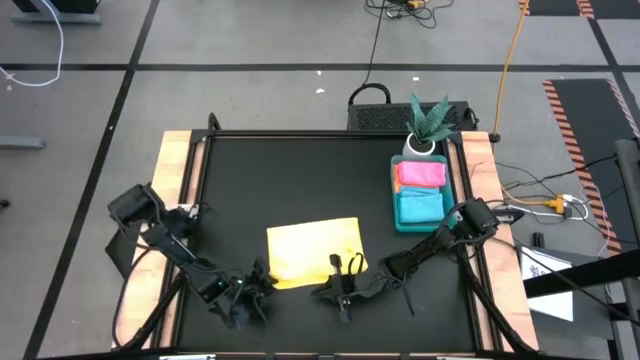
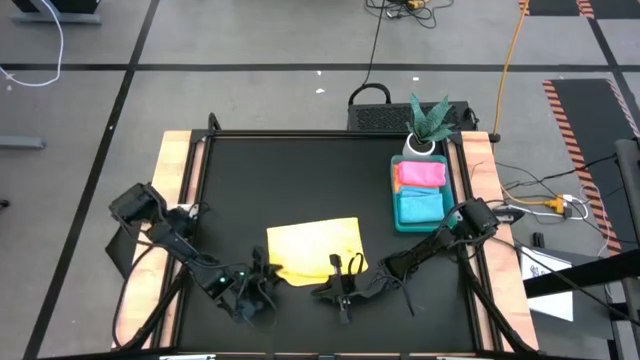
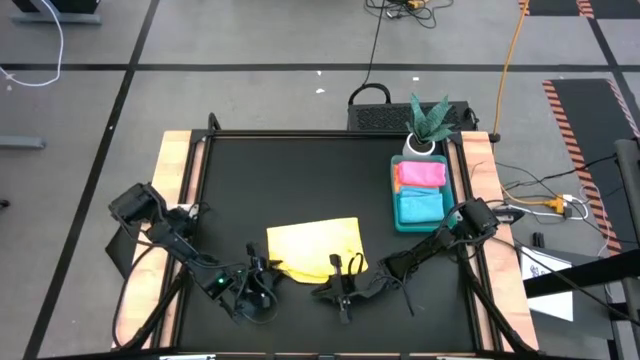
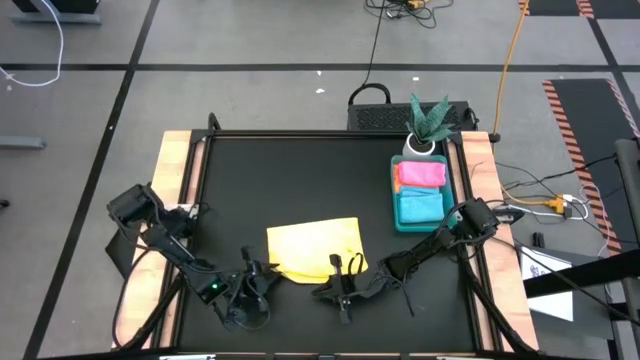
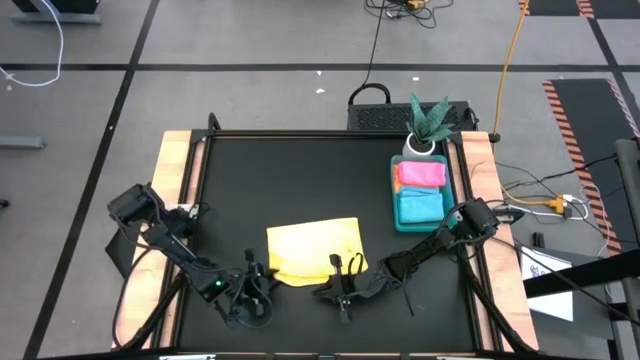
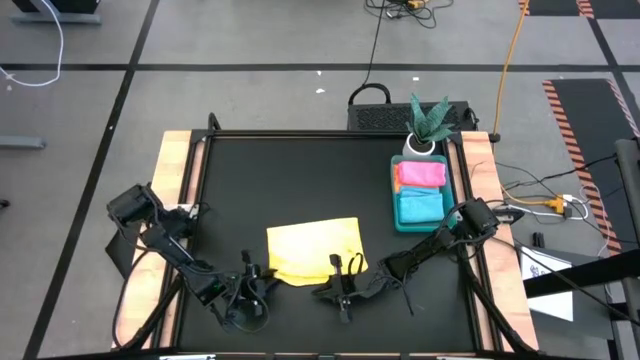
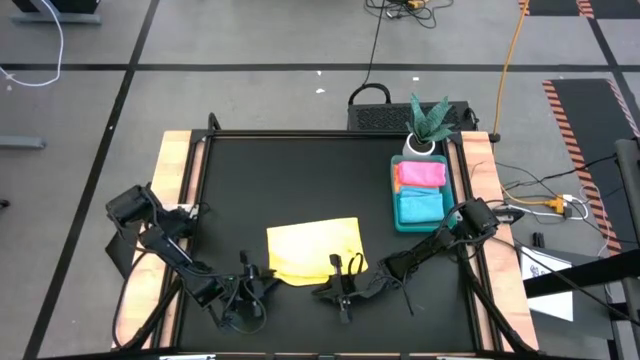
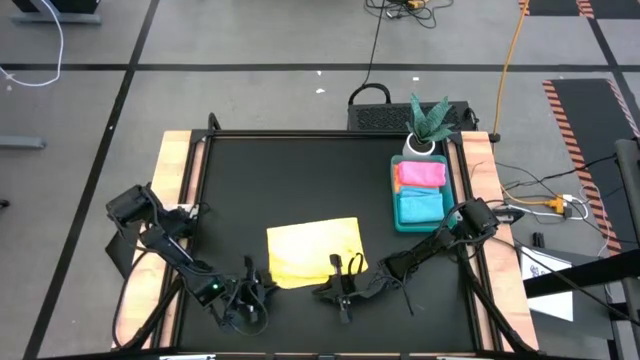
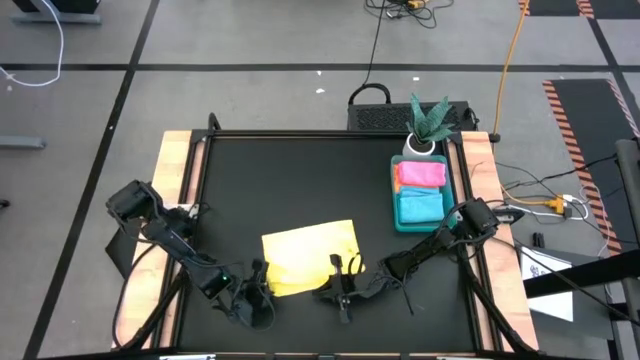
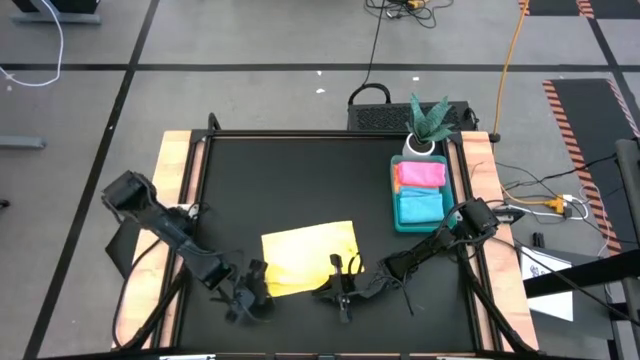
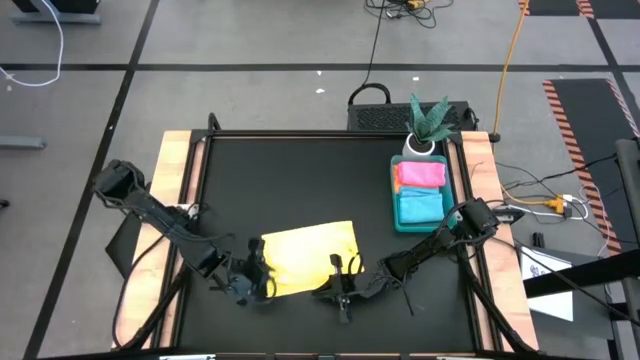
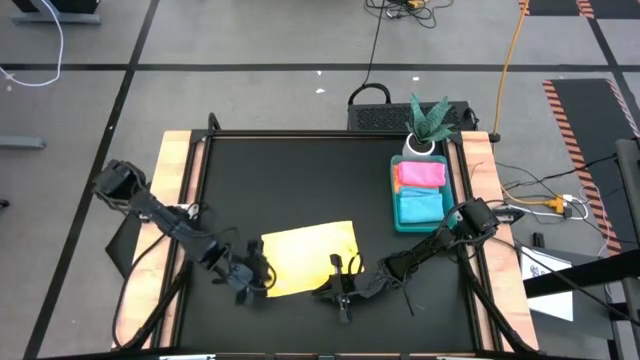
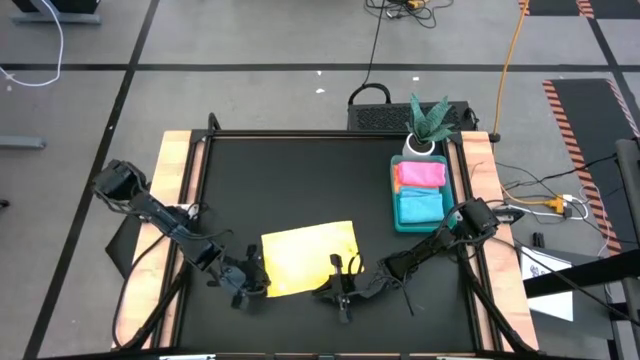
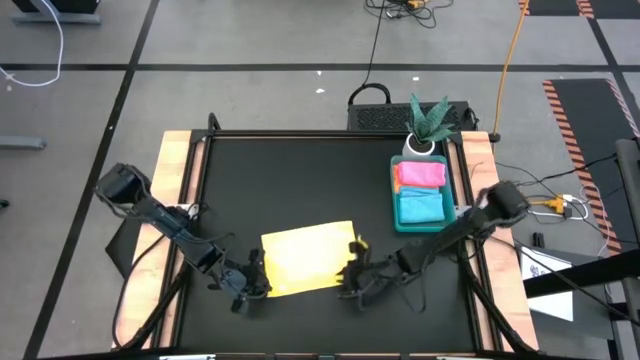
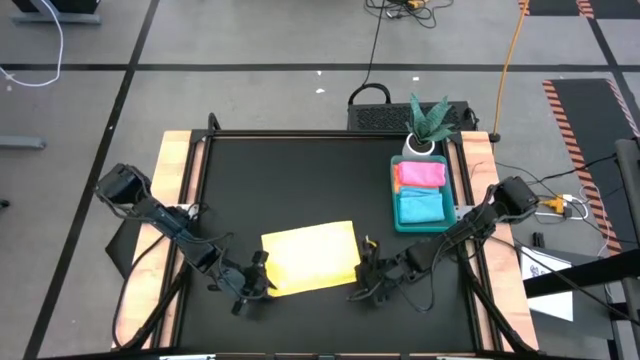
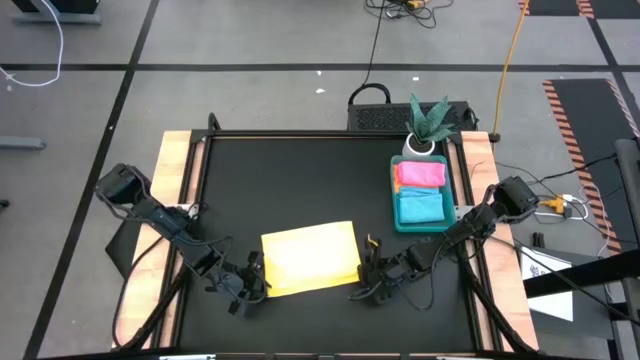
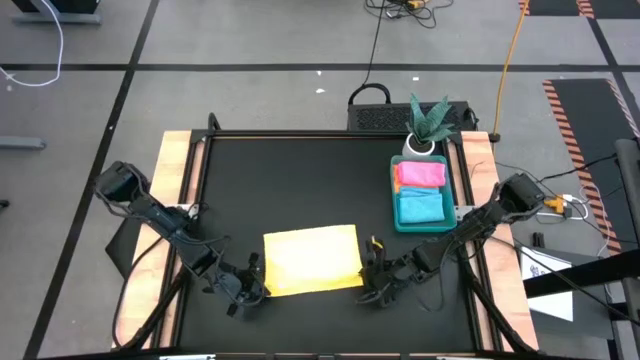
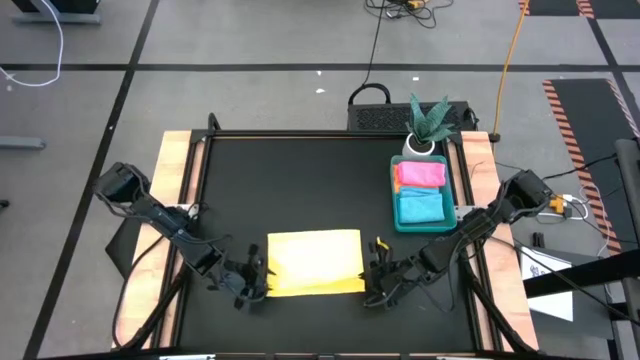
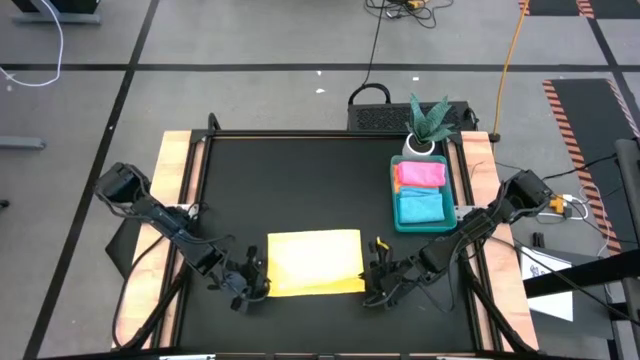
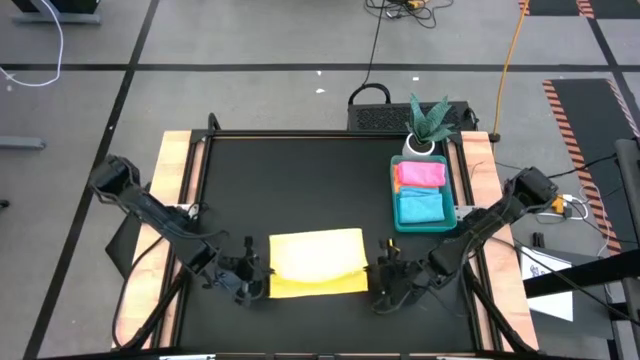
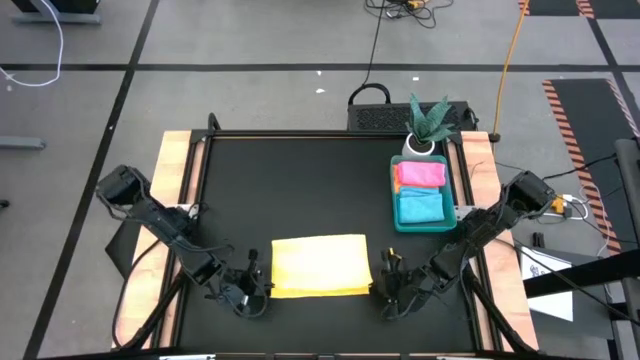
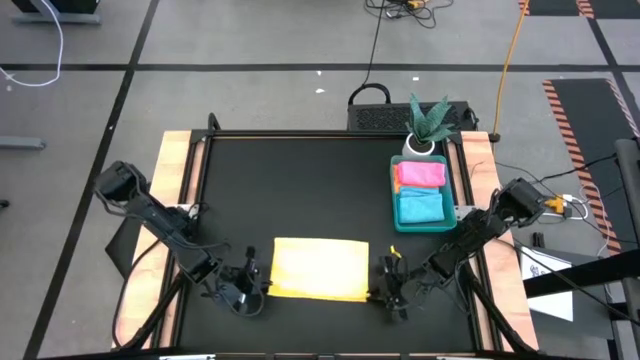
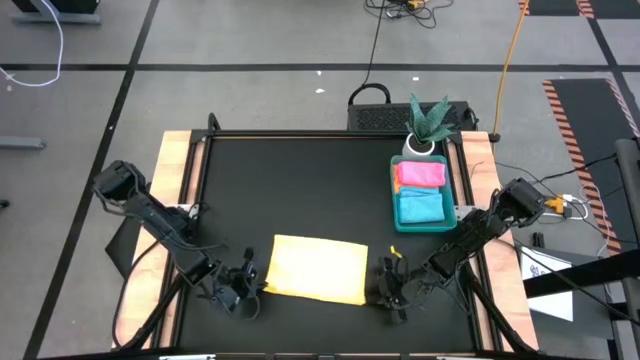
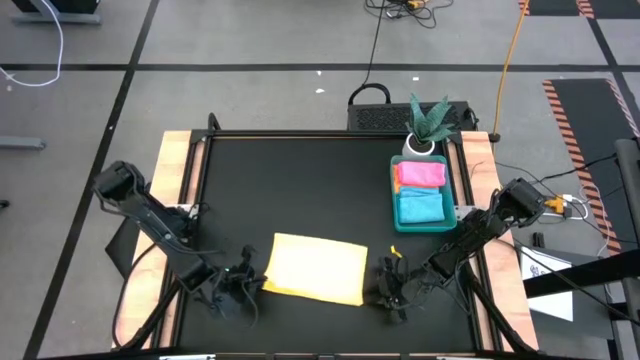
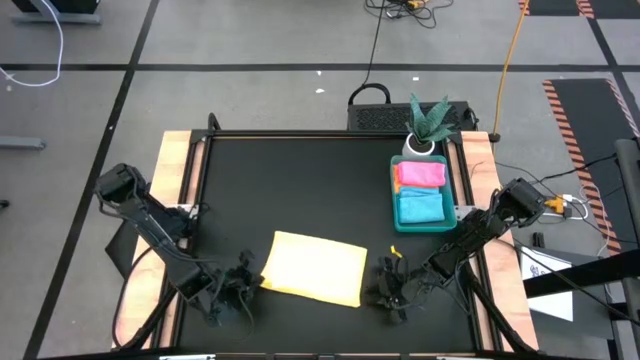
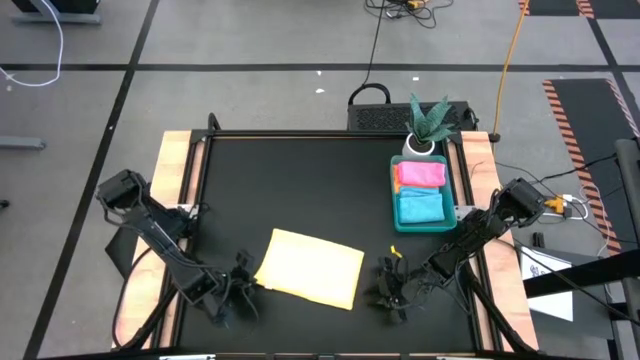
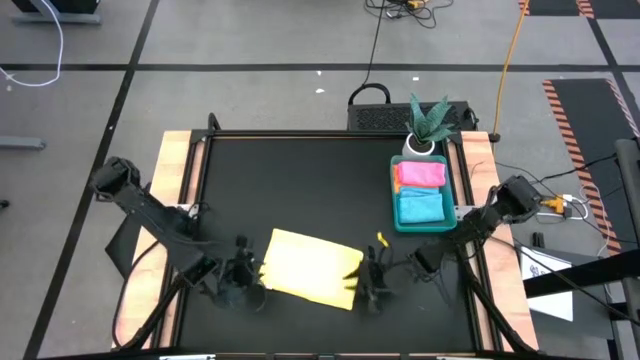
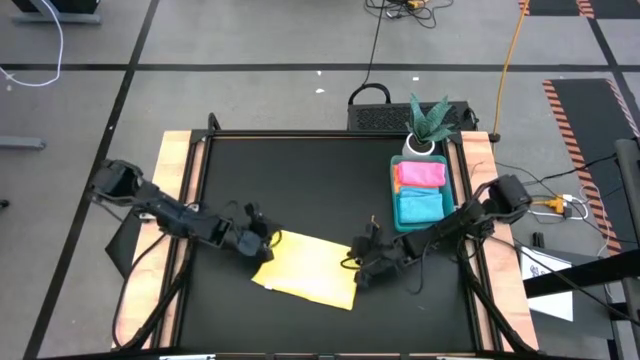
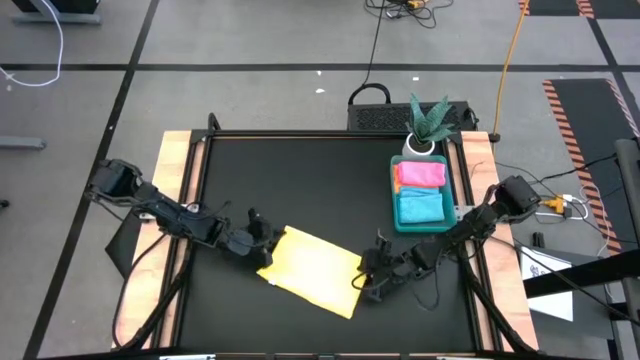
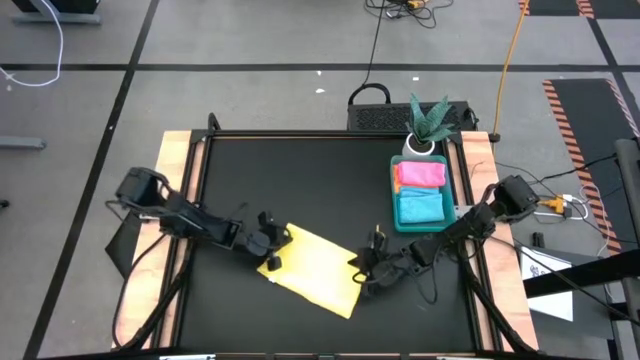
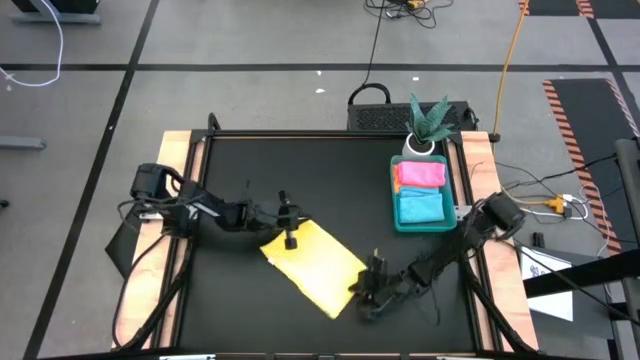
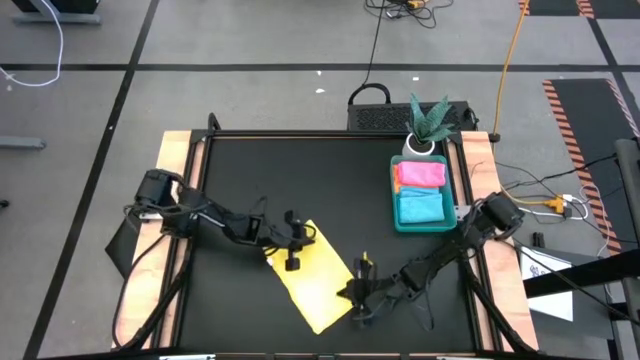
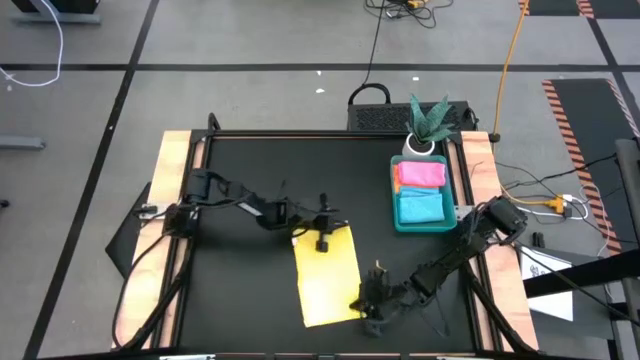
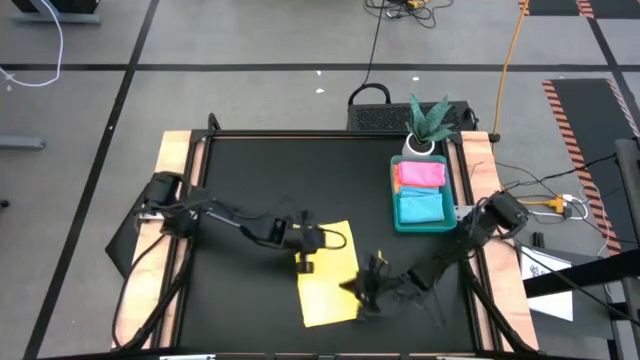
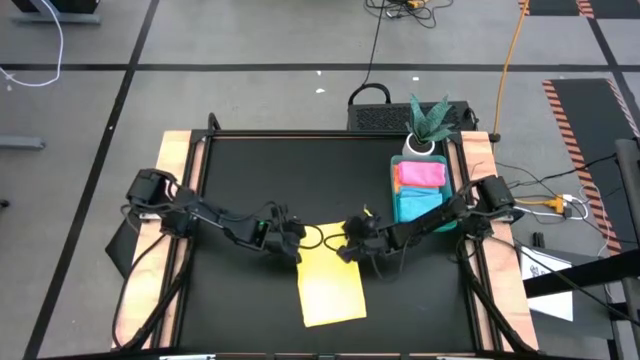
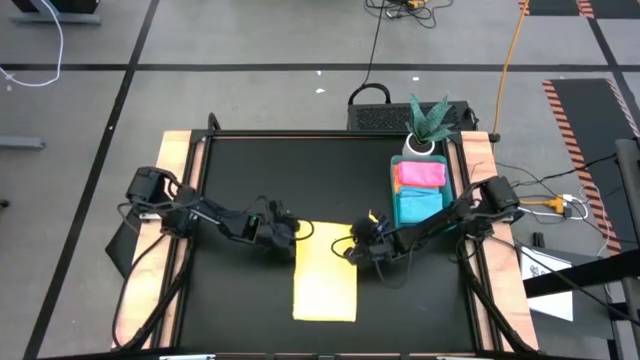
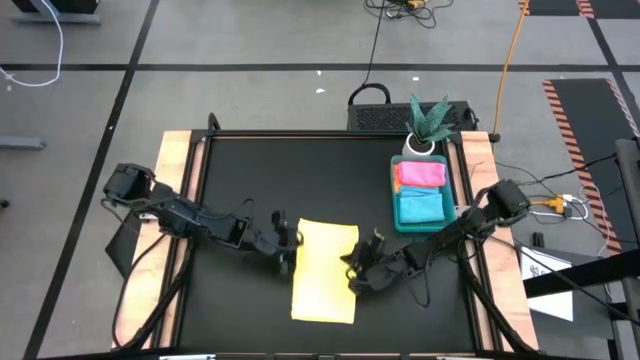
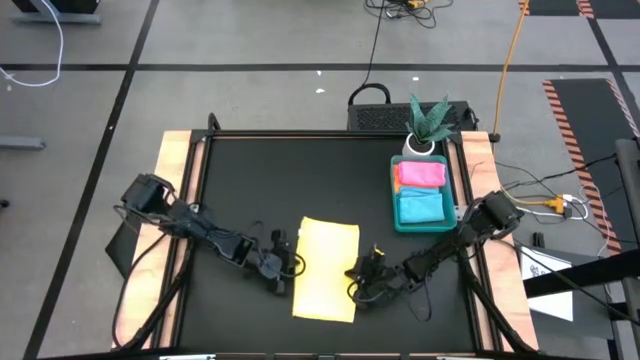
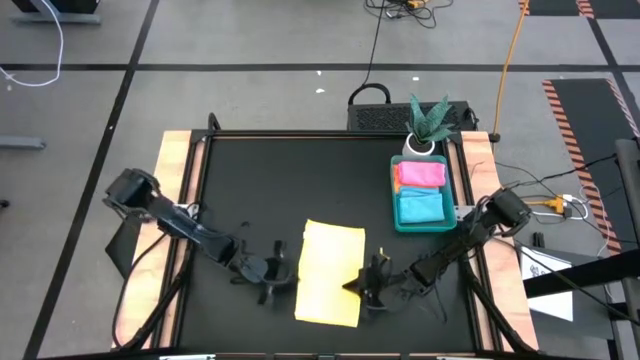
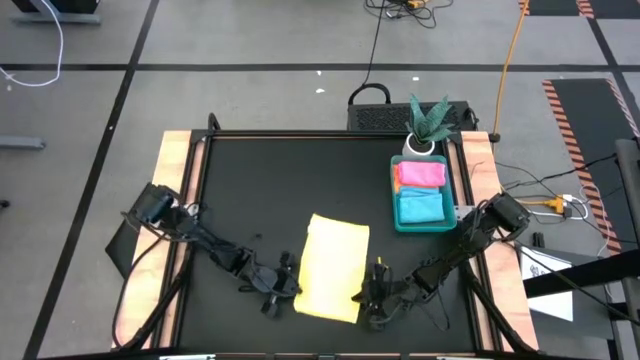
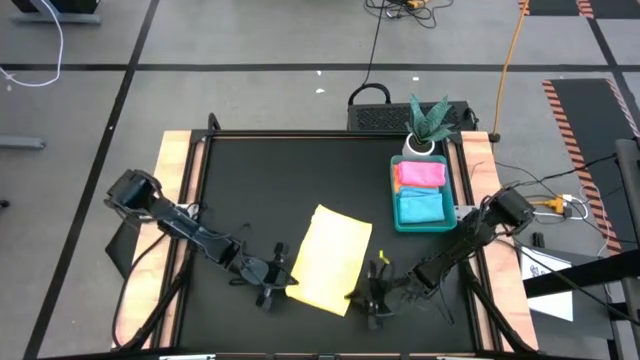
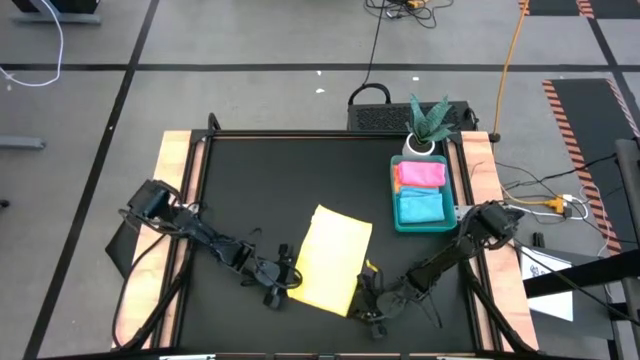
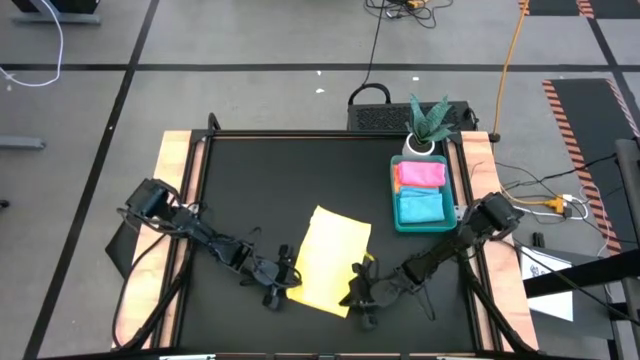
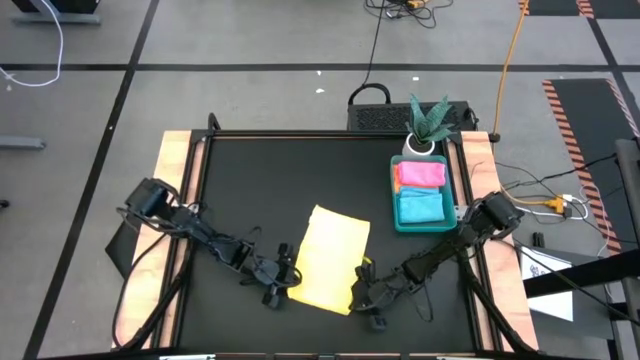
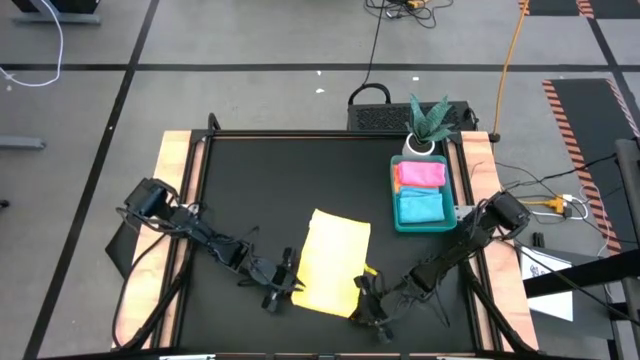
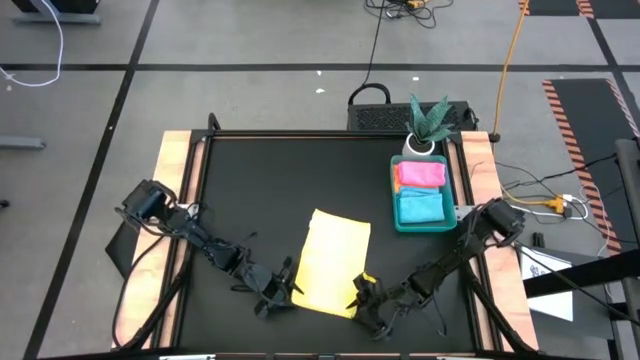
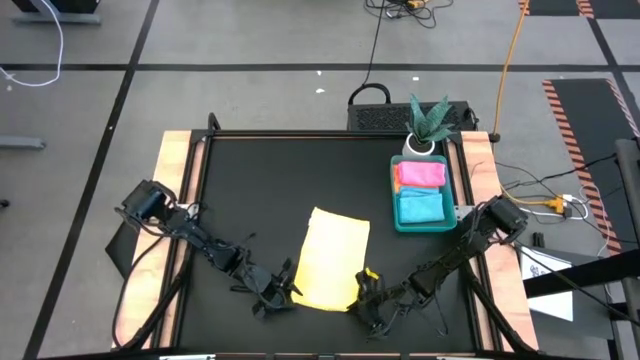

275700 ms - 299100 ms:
Task: Fold microfiber towels
Fold the yellow microfiber cloth
